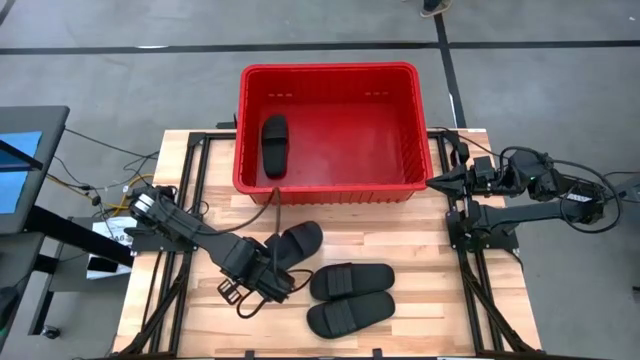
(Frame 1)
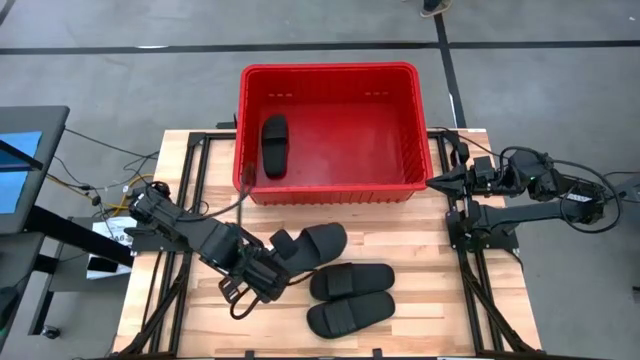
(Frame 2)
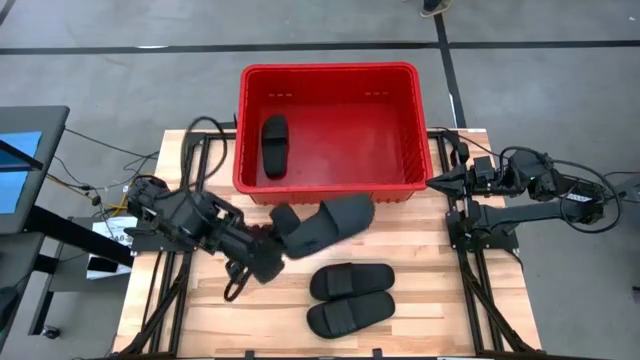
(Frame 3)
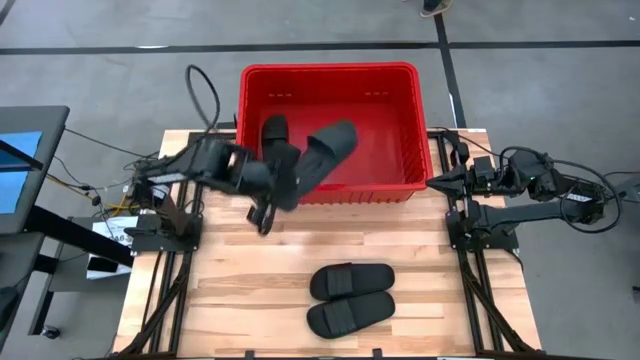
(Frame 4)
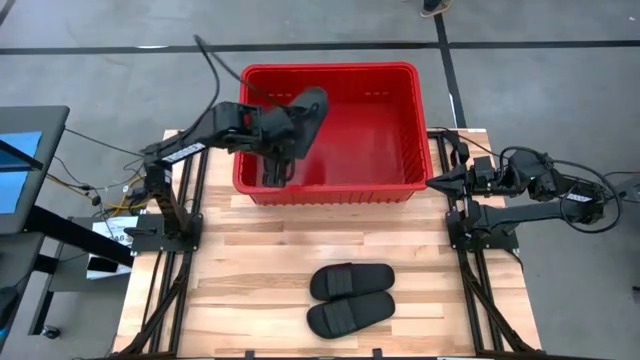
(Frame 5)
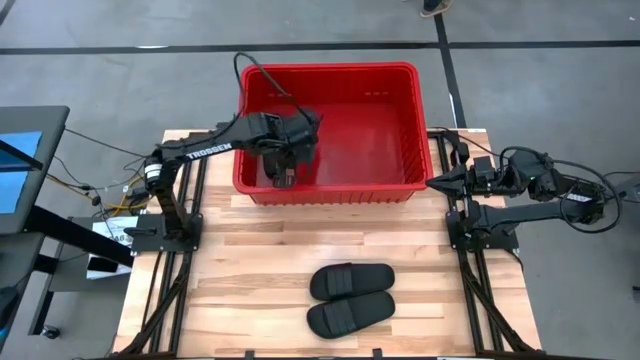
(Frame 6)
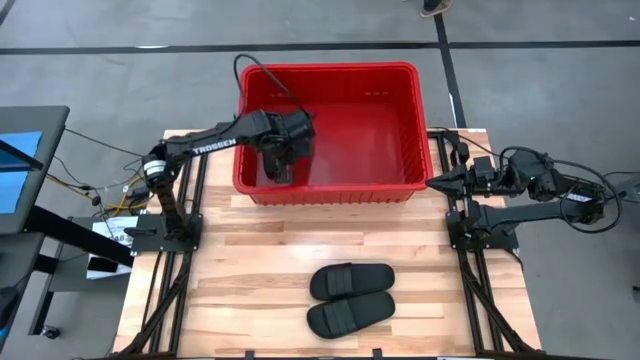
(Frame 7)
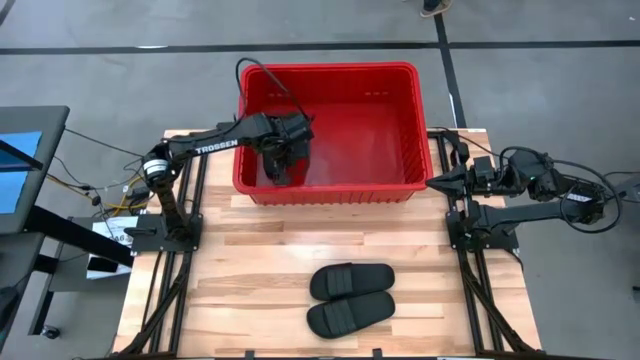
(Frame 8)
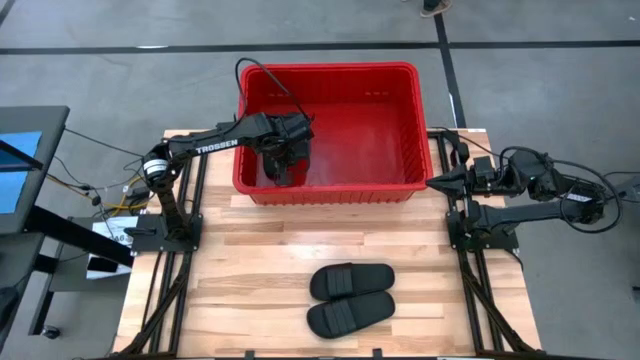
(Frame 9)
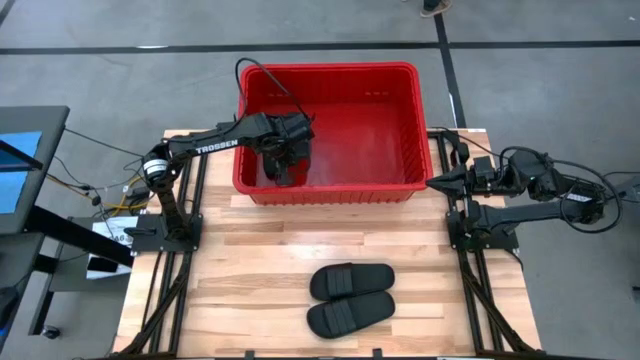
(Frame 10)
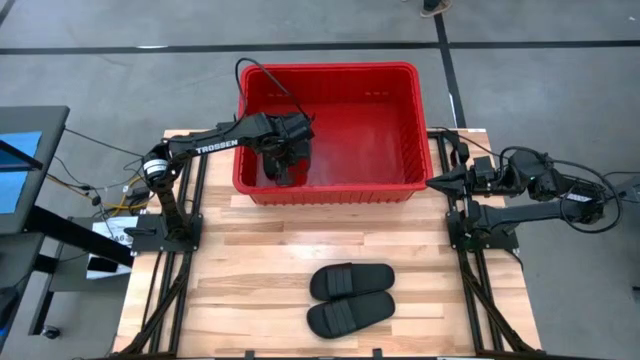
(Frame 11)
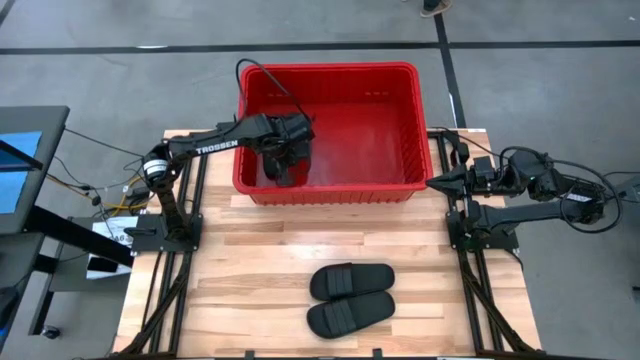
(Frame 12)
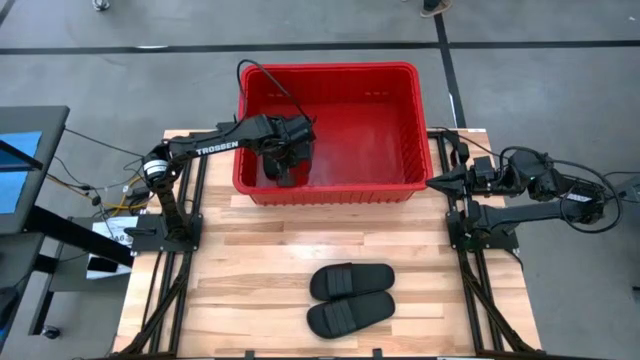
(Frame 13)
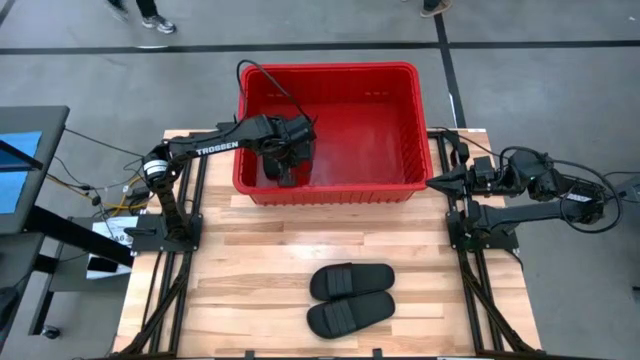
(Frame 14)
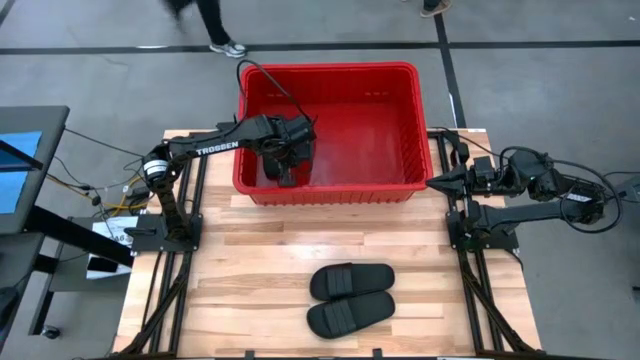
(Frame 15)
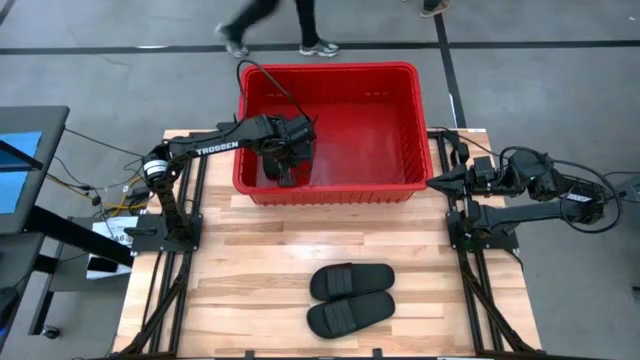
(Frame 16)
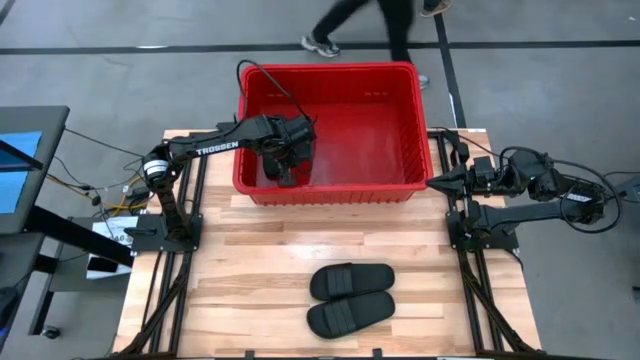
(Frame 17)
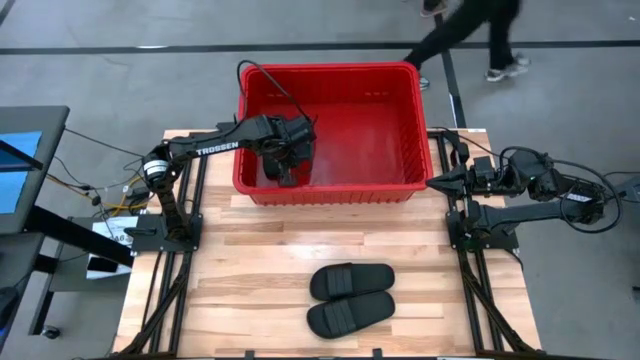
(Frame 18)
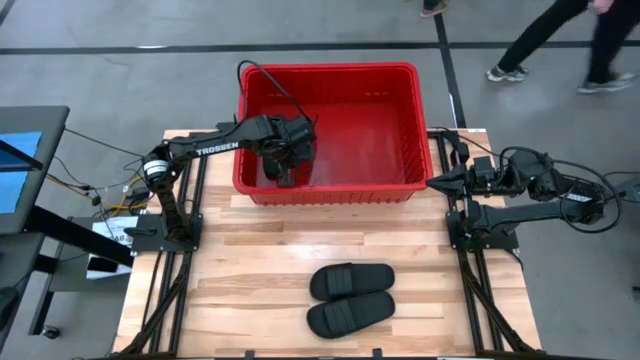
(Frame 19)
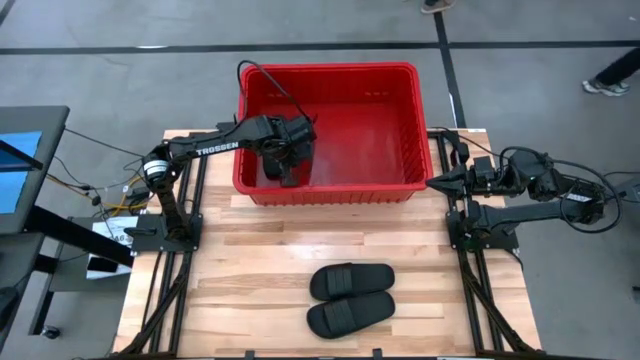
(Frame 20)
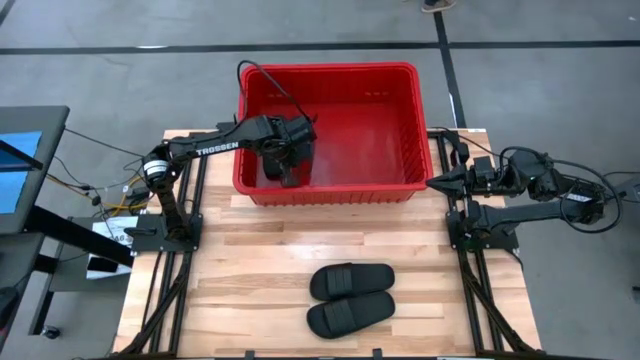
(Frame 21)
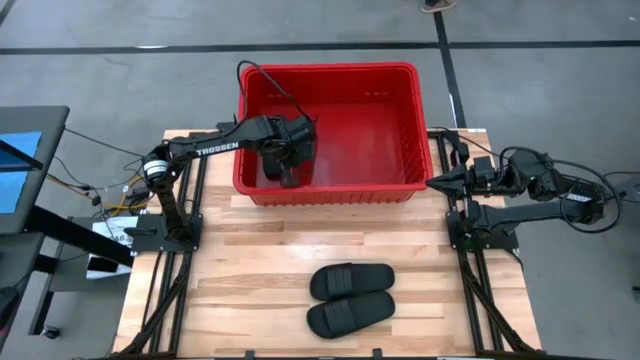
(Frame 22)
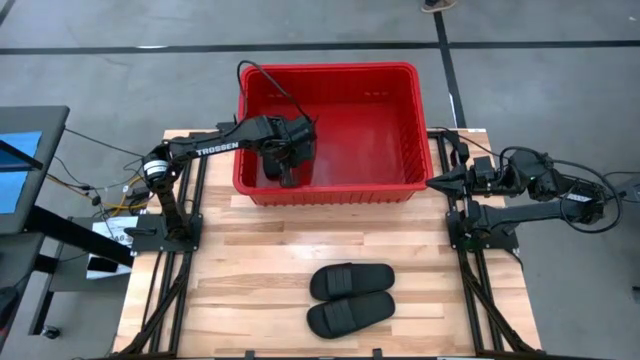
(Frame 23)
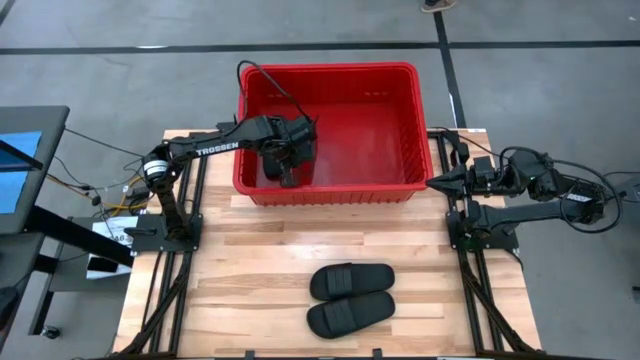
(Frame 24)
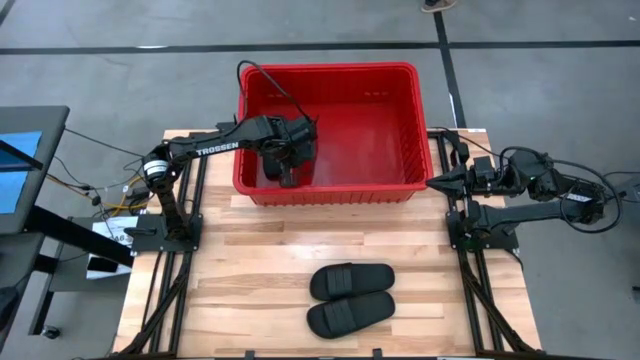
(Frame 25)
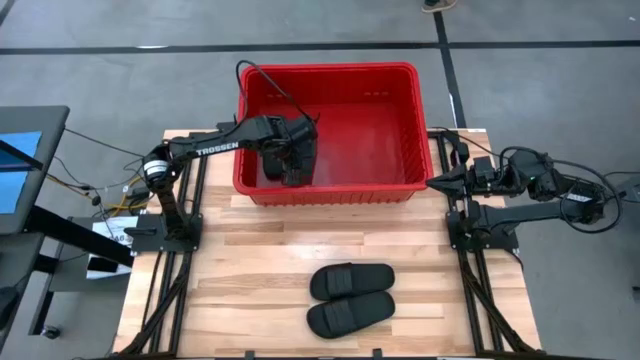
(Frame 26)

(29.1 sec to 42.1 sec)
Task: Pick and place slides into bin
Put the top black slipper into the red bin

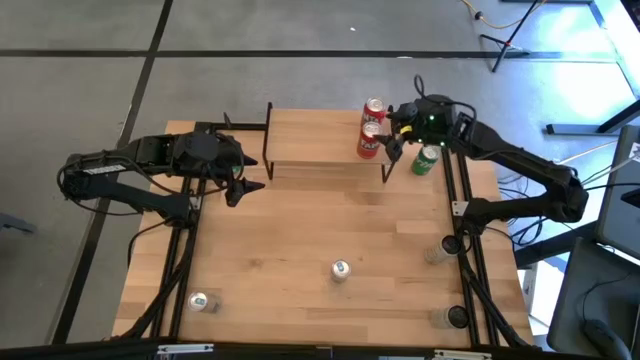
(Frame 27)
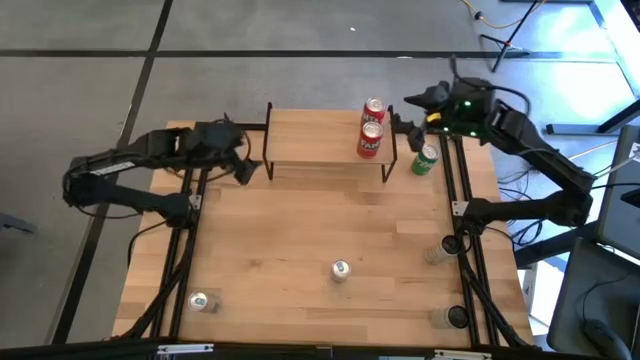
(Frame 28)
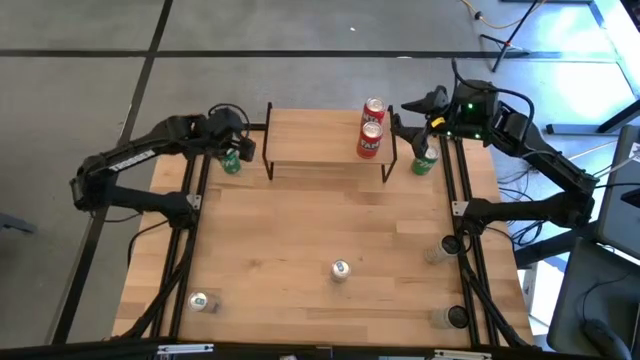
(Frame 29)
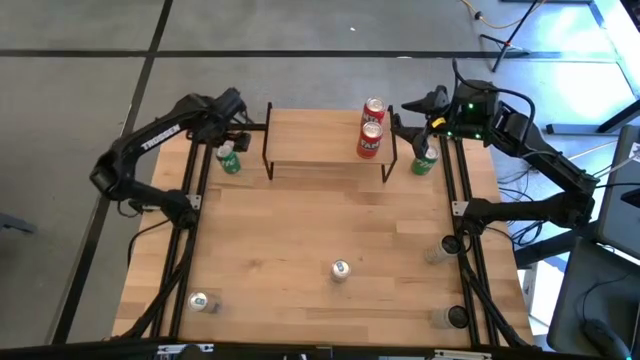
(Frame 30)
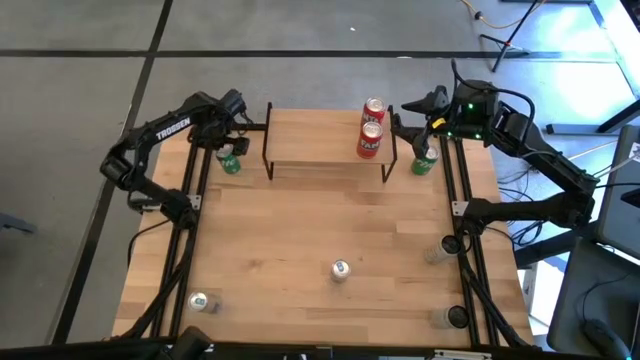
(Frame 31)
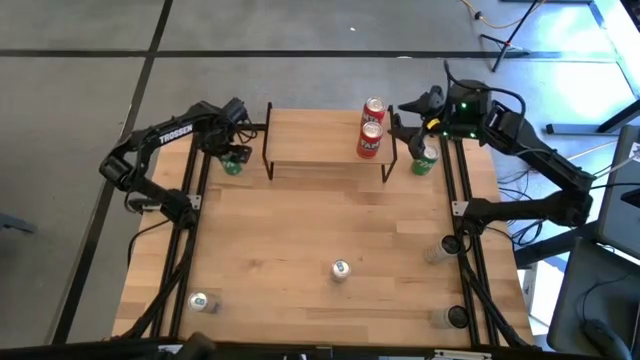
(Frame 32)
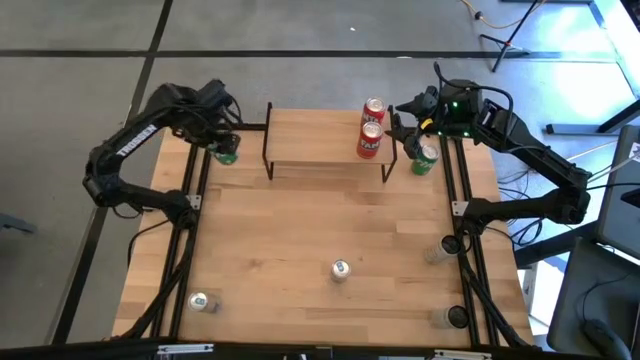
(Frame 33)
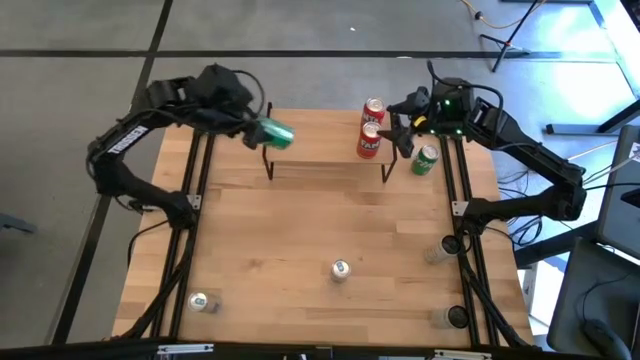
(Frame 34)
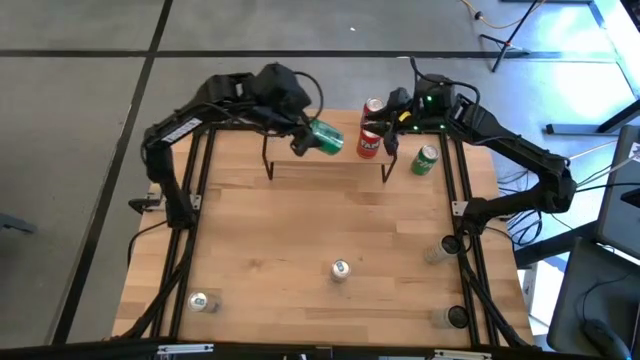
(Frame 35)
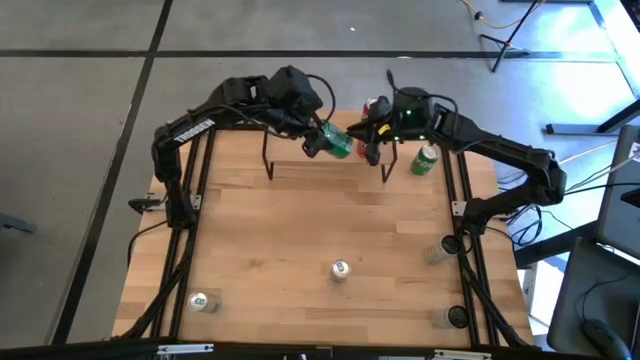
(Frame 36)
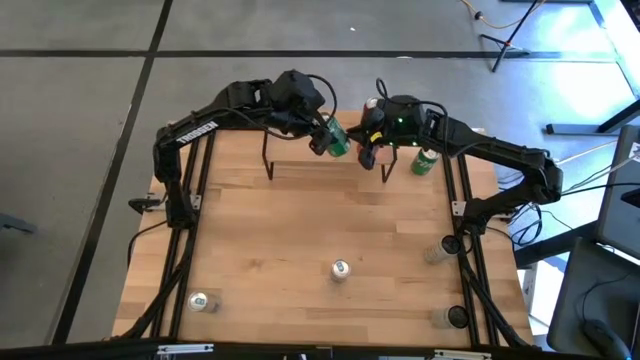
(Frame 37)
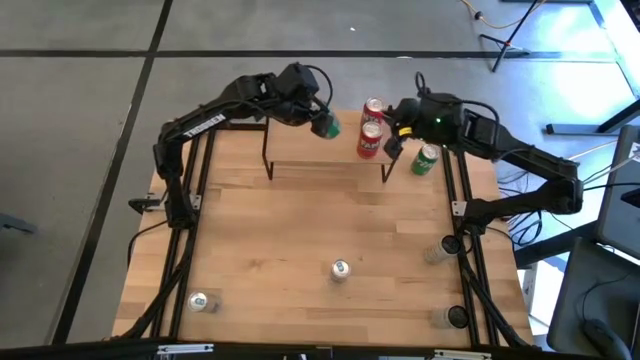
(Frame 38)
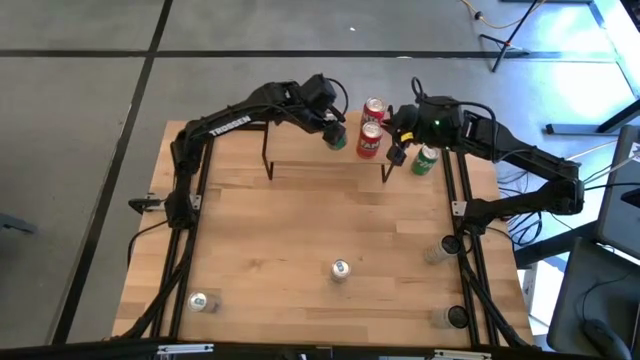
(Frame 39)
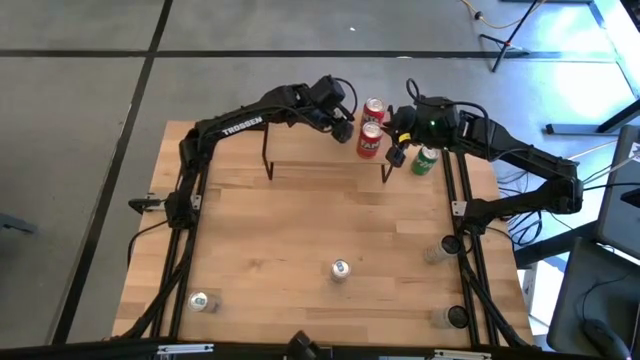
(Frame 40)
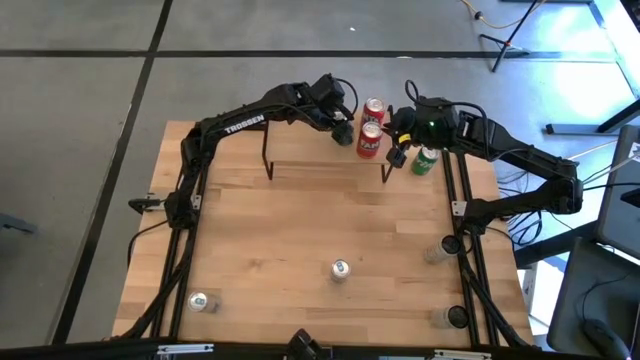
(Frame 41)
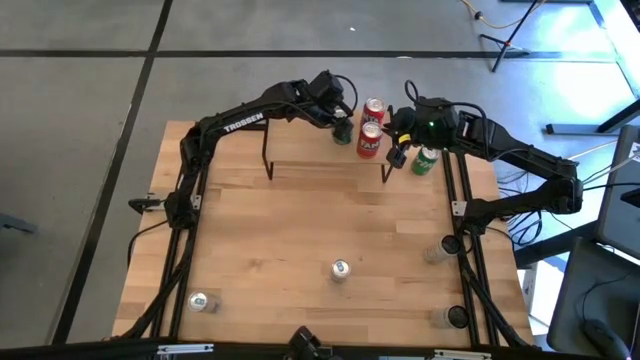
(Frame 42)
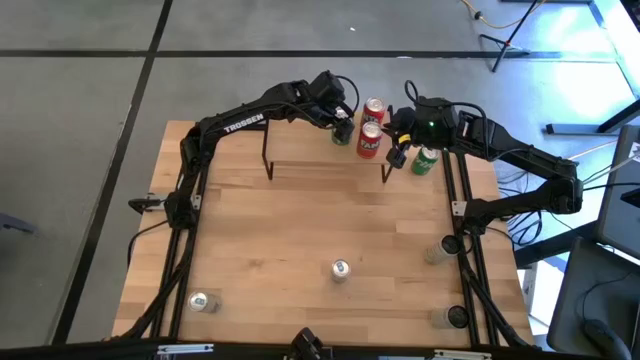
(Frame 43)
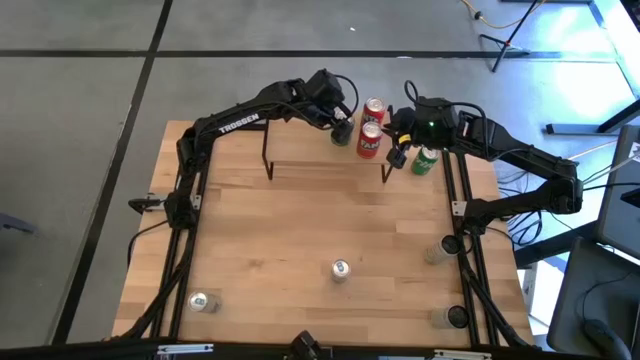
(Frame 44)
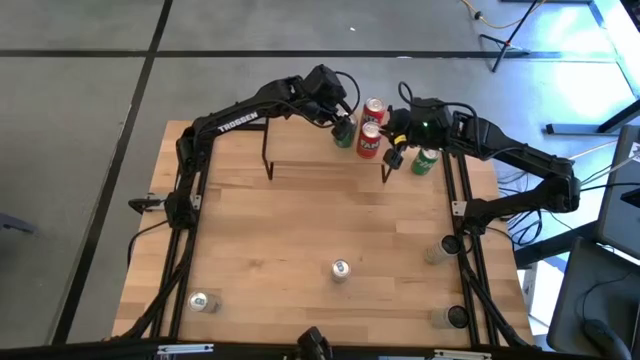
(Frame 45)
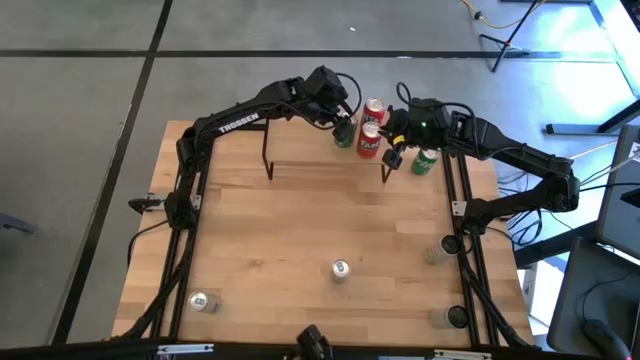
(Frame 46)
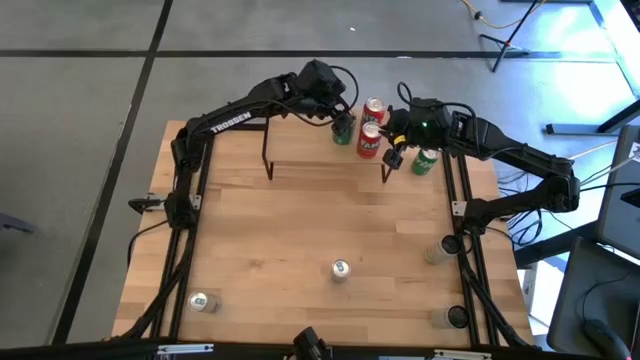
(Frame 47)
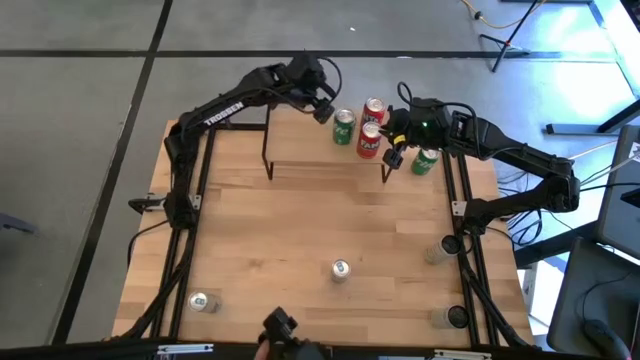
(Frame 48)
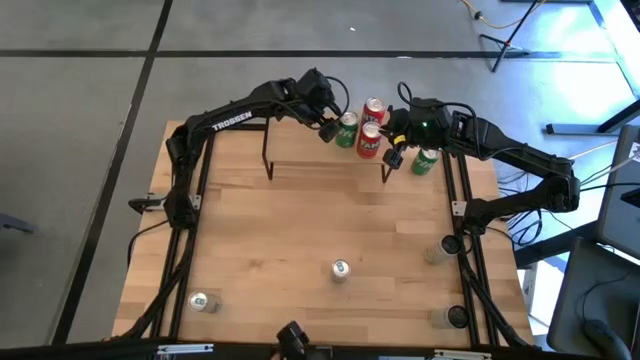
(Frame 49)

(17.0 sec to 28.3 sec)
Task: Place canned beverage on shelf
Put the left green soda can on the shelf
